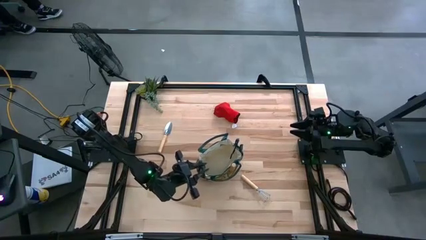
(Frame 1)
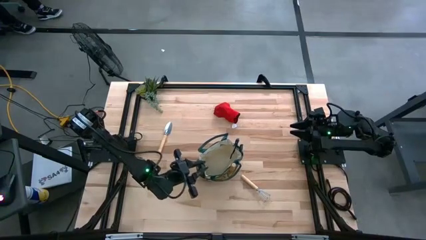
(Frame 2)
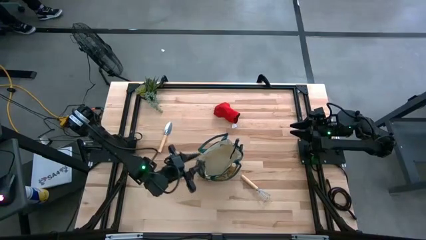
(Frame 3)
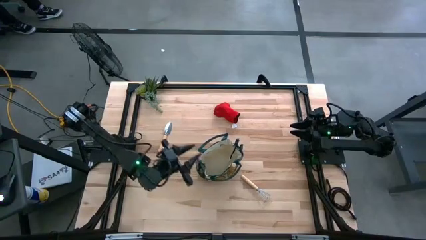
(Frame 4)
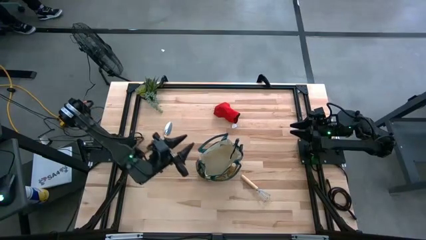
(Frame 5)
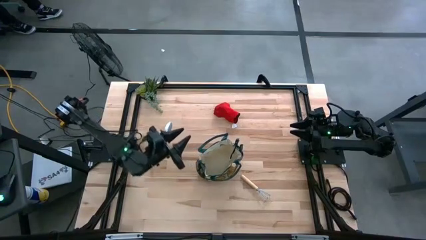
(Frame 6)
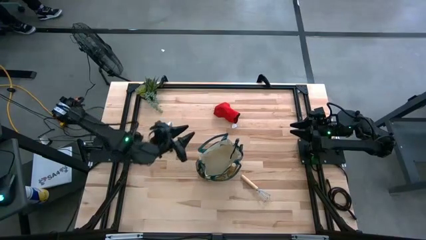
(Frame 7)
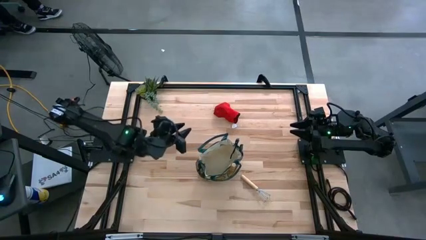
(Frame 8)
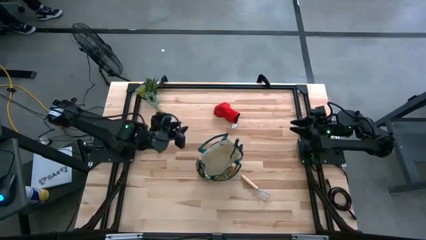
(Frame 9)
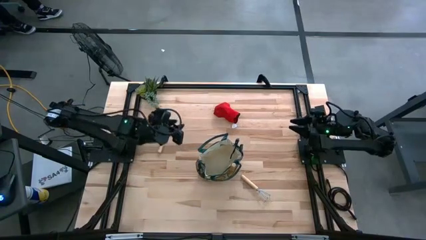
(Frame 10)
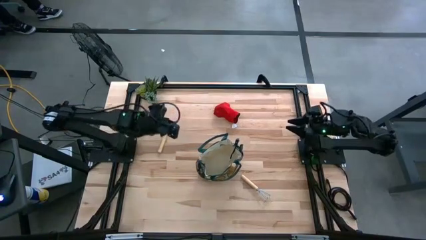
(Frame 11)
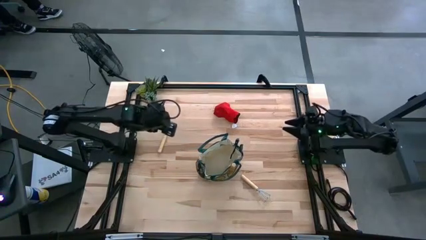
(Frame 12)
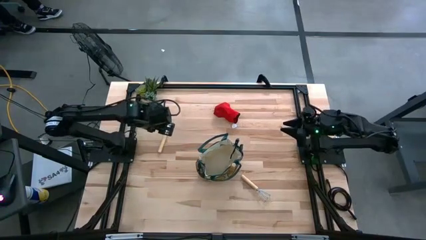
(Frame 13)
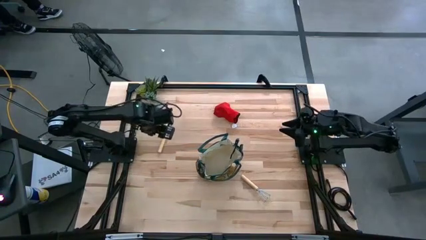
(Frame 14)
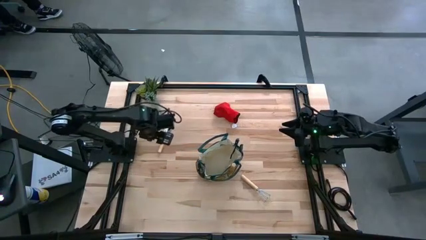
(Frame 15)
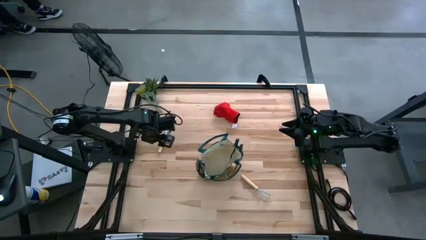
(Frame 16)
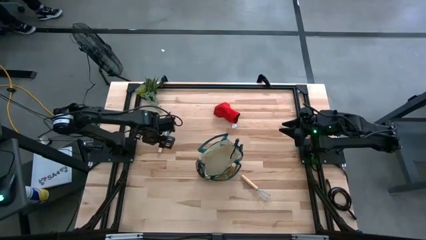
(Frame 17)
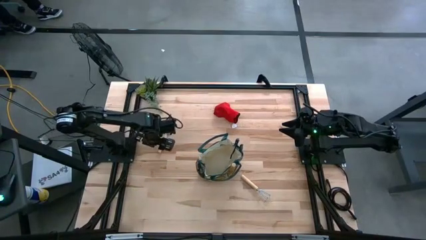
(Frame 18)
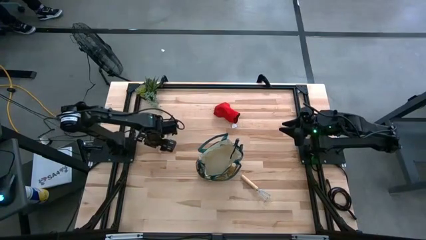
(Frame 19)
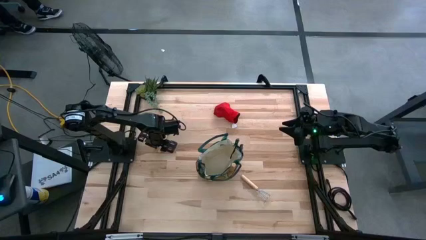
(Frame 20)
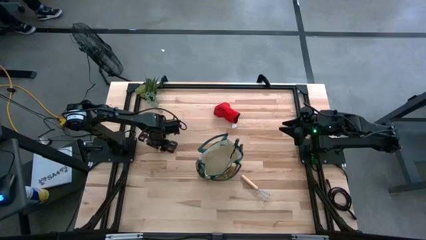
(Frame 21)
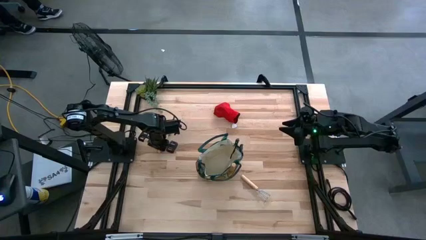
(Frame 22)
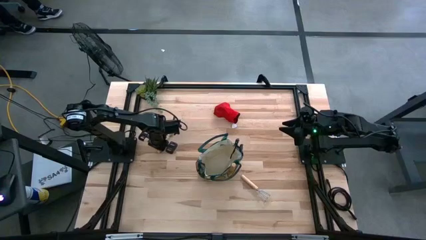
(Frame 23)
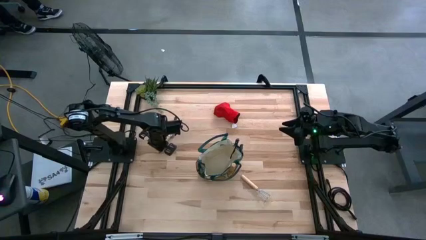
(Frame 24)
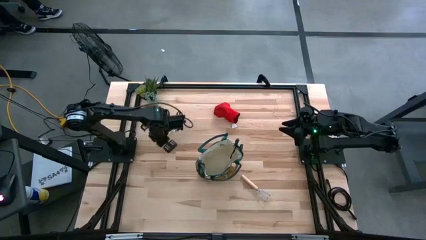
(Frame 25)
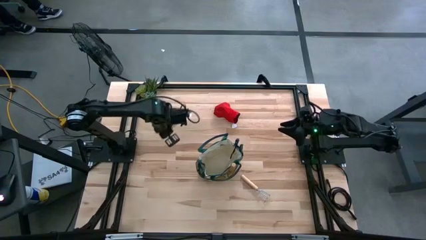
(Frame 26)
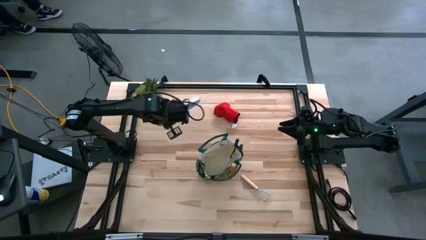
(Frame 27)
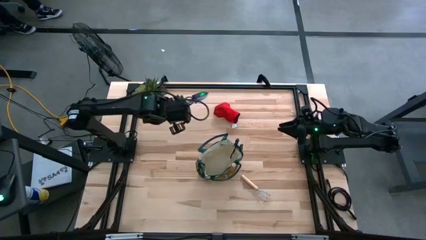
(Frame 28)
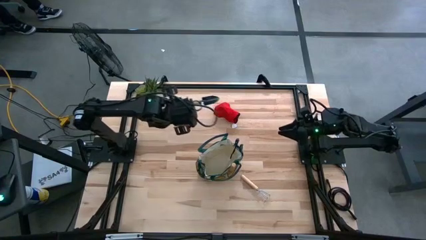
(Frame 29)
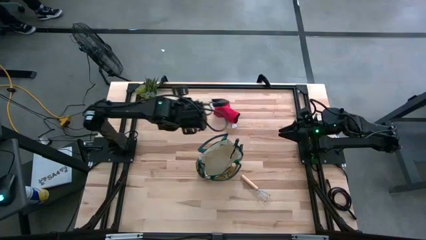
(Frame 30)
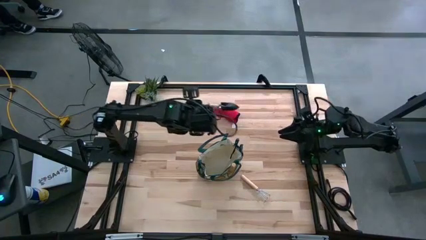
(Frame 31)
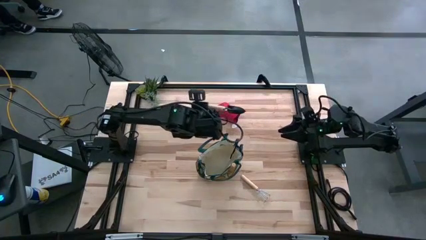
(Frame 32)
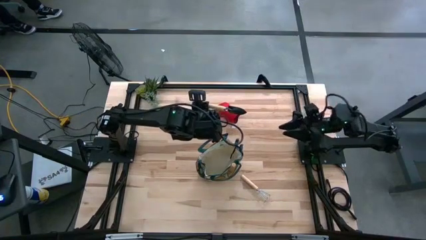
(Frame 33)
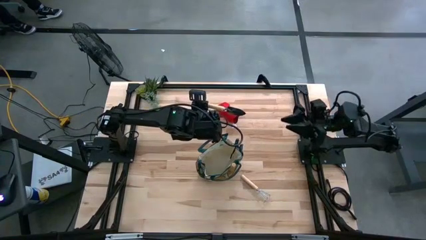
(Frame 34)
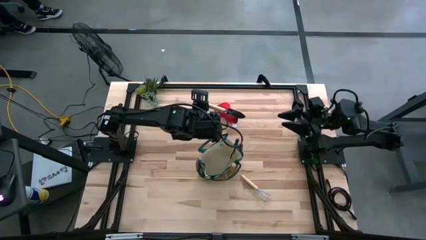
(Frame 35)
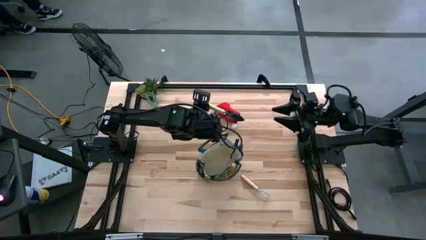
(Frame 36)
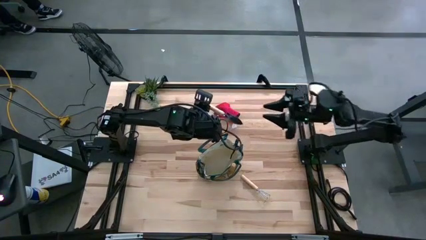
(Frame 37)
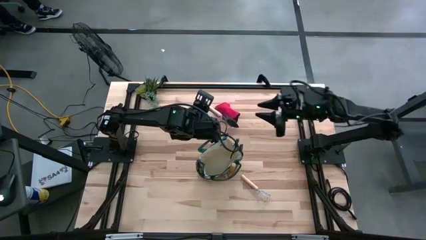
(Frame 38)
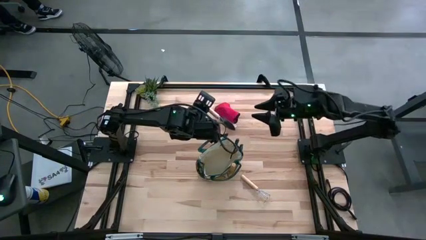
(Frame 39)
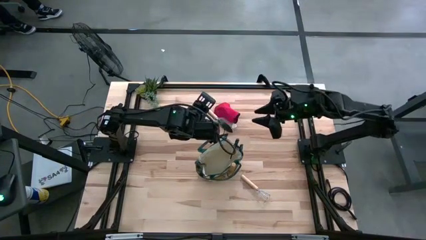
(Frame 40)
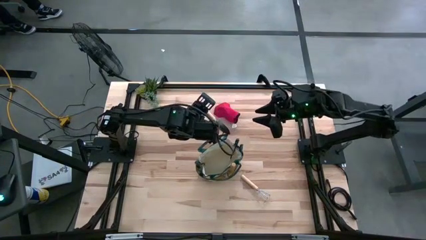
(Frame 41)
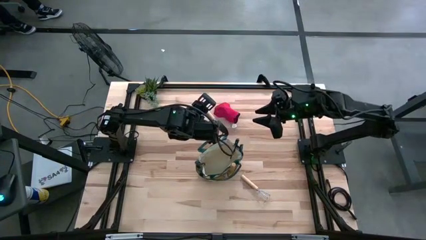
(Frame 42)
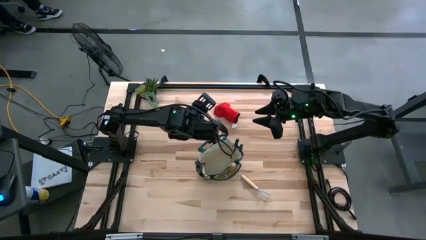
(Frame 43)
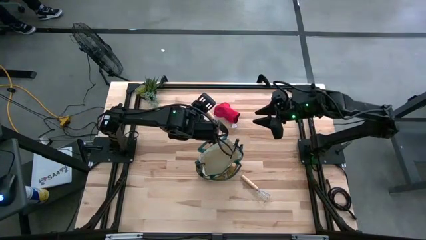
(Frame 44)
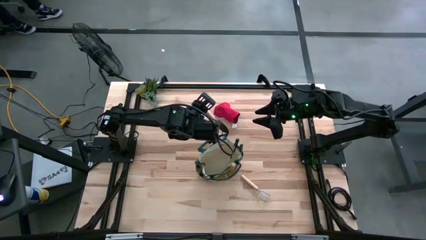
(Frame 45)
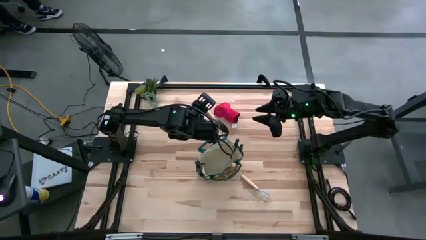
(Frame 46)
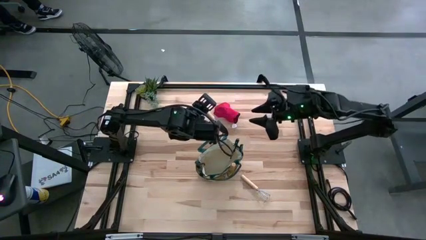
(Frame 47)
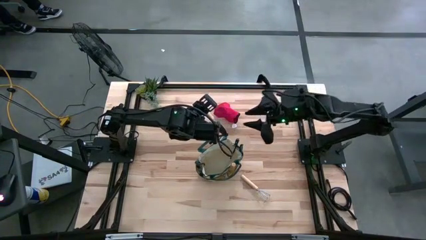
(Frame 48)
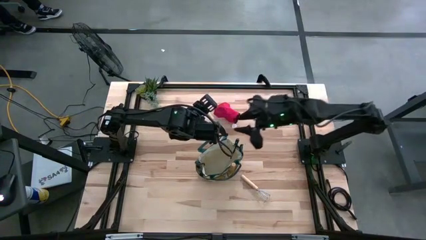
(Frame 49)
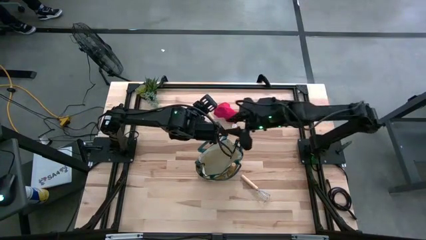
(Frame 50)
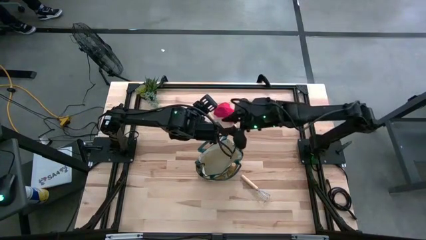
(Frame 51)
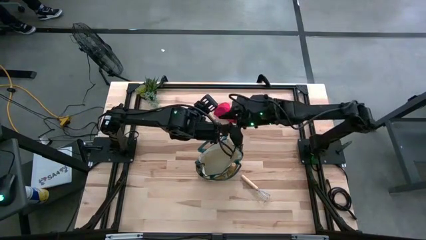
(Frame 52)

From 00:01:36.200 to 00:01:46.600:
Task: Pick & Place Garden tools in Gardening bag
Put the brown trowel into the white gardening bag
